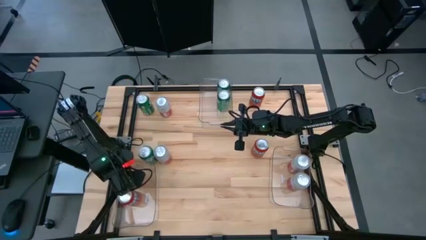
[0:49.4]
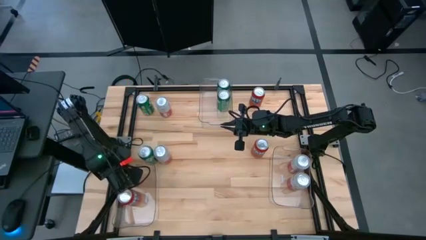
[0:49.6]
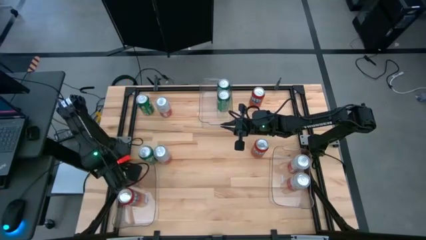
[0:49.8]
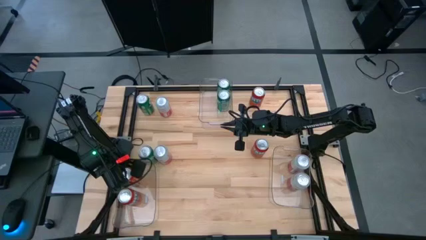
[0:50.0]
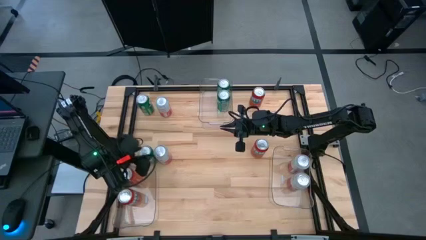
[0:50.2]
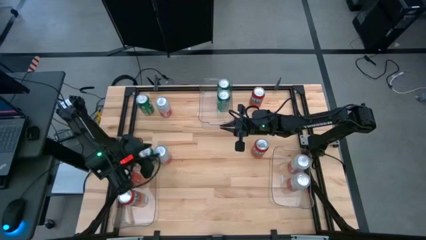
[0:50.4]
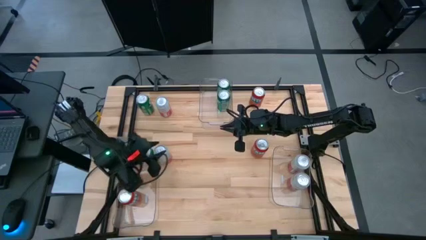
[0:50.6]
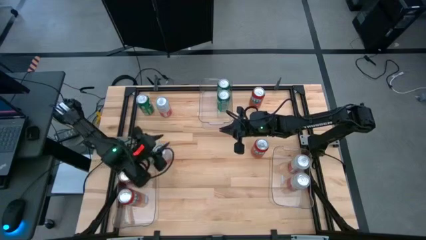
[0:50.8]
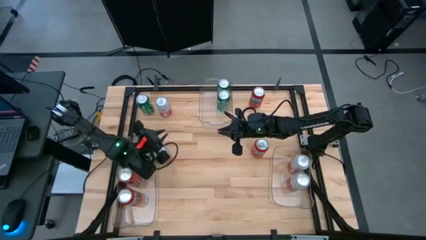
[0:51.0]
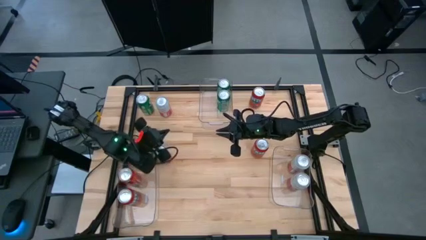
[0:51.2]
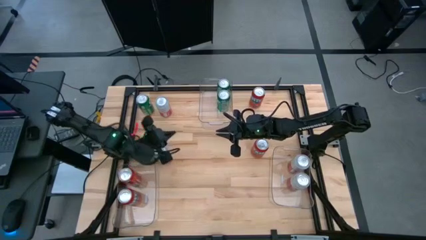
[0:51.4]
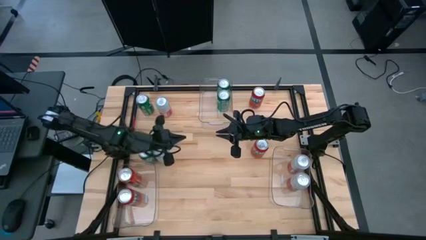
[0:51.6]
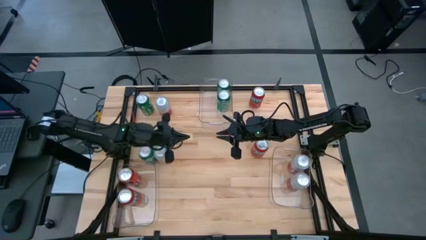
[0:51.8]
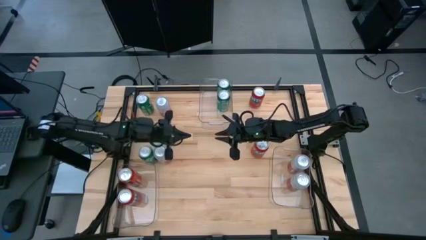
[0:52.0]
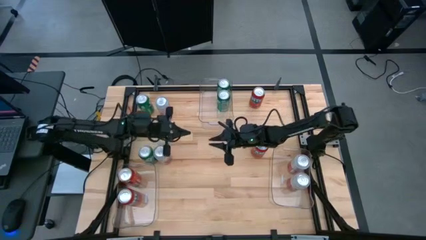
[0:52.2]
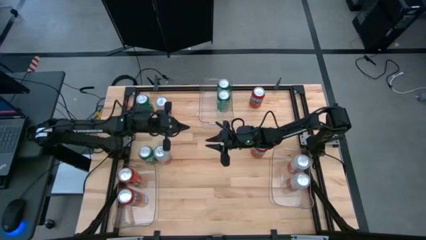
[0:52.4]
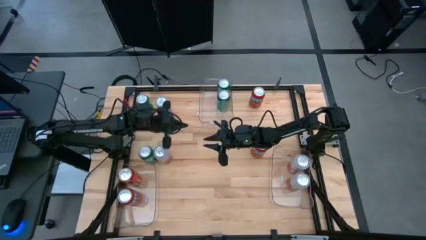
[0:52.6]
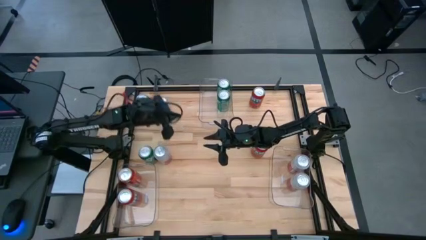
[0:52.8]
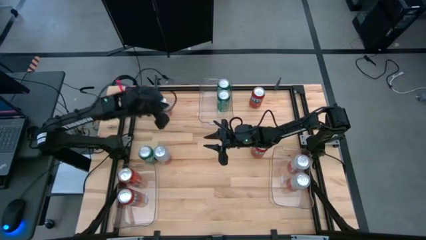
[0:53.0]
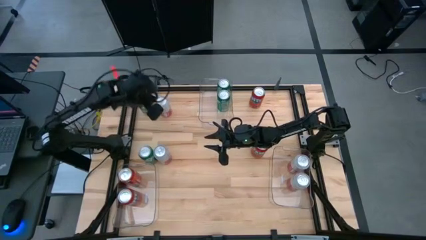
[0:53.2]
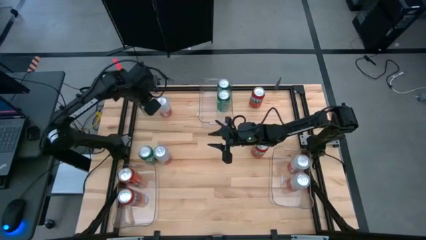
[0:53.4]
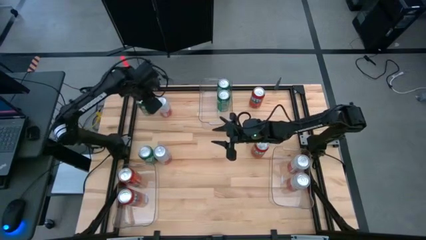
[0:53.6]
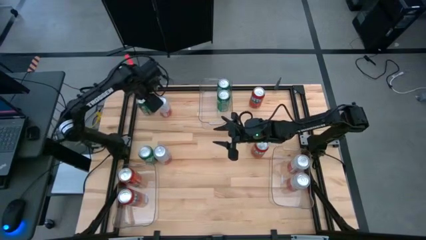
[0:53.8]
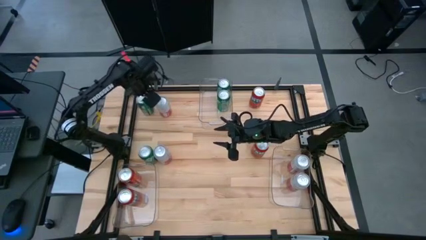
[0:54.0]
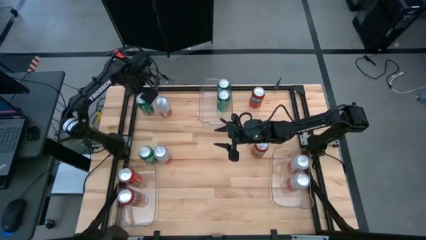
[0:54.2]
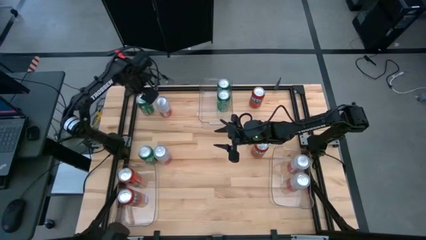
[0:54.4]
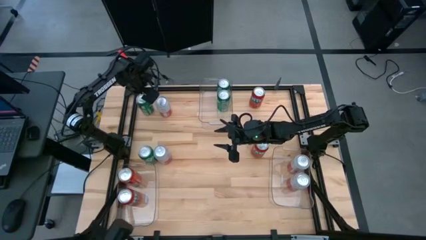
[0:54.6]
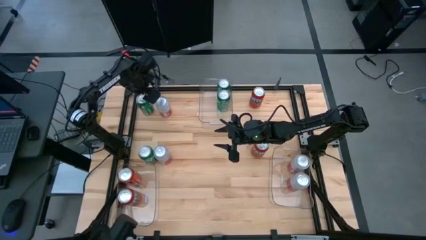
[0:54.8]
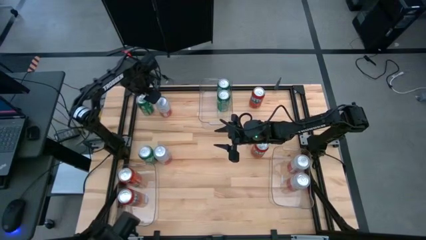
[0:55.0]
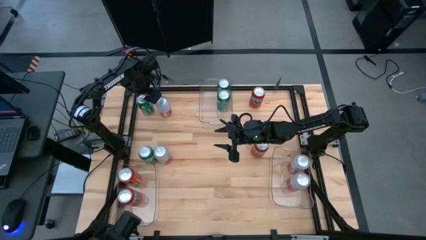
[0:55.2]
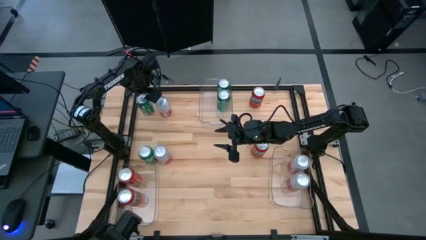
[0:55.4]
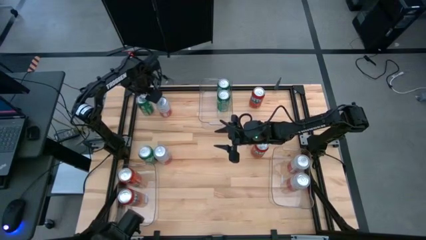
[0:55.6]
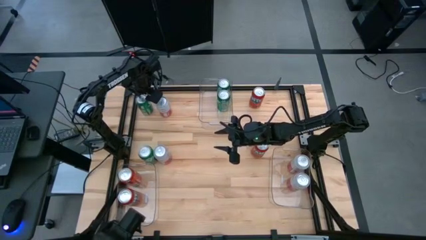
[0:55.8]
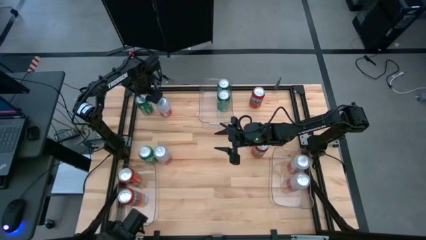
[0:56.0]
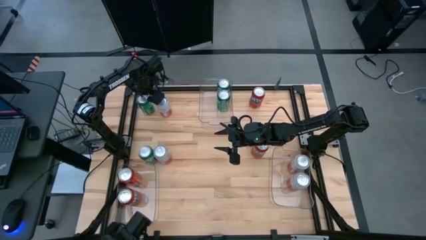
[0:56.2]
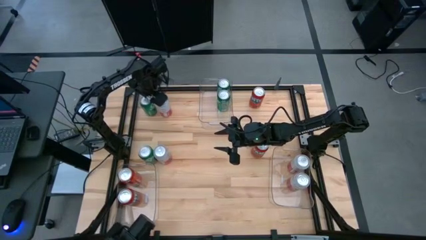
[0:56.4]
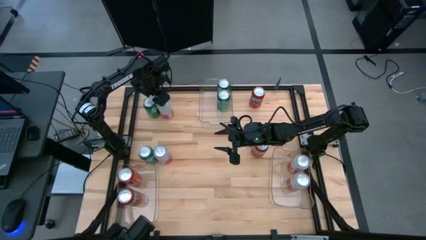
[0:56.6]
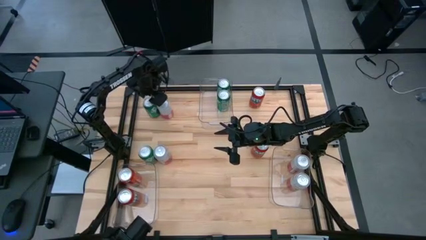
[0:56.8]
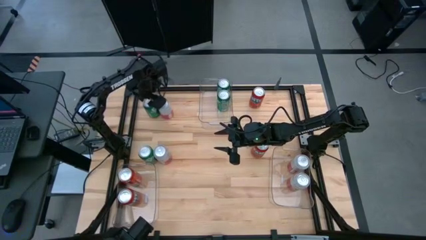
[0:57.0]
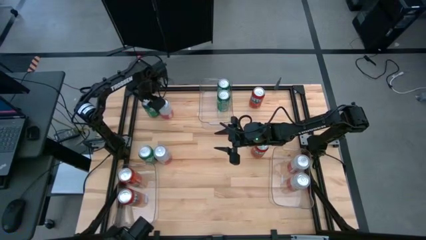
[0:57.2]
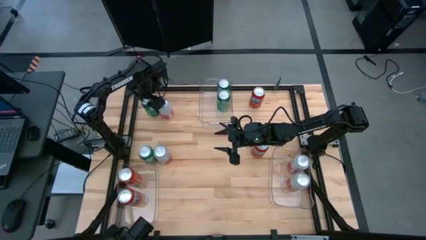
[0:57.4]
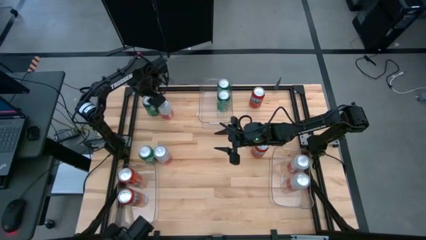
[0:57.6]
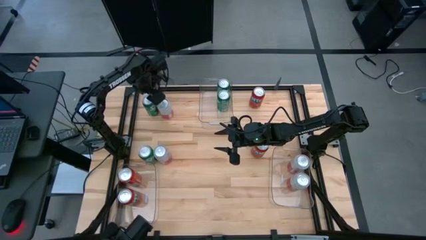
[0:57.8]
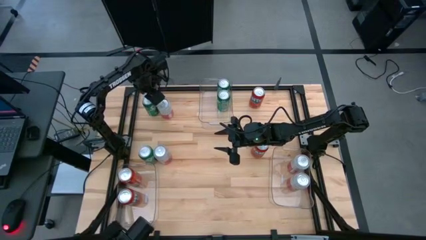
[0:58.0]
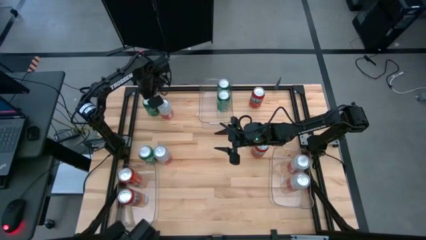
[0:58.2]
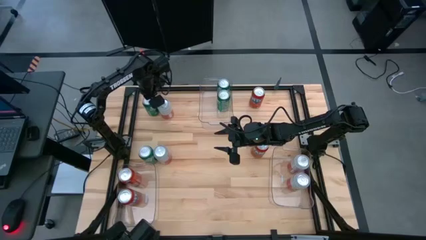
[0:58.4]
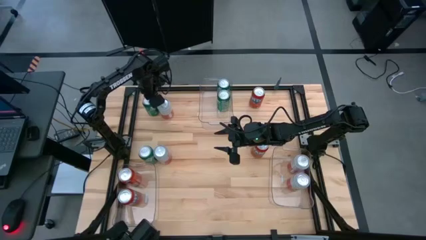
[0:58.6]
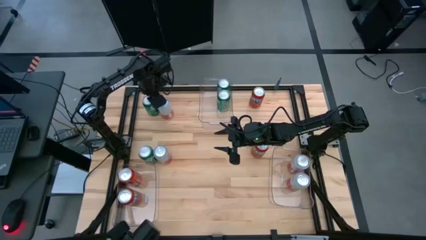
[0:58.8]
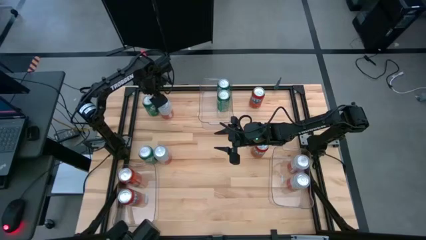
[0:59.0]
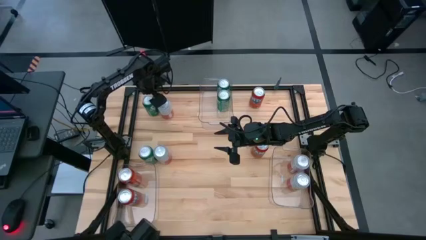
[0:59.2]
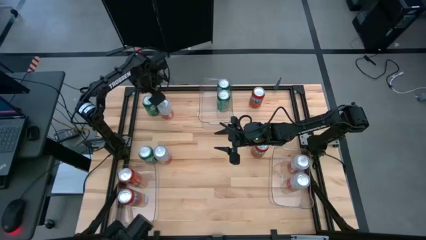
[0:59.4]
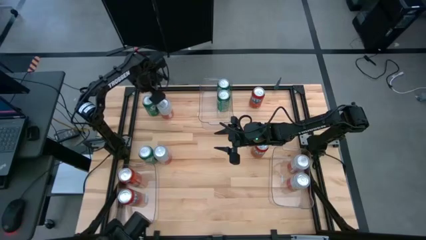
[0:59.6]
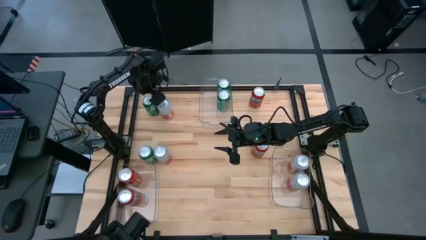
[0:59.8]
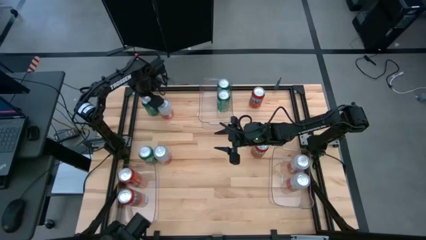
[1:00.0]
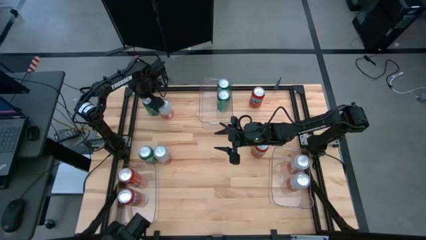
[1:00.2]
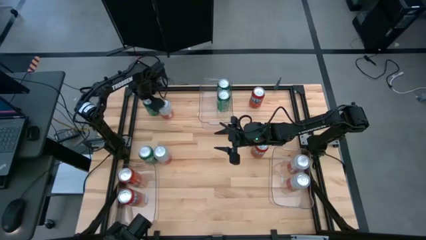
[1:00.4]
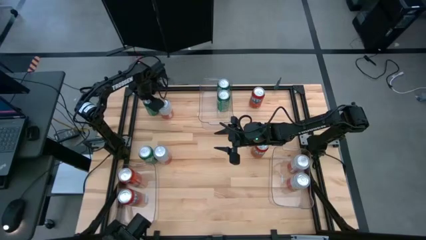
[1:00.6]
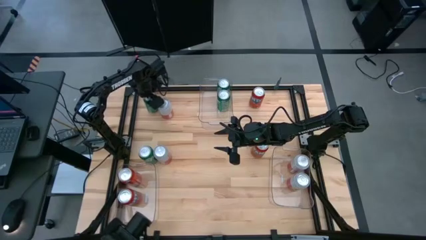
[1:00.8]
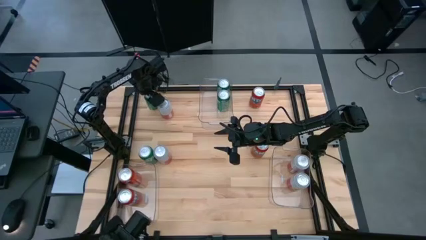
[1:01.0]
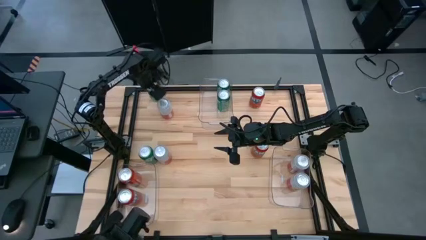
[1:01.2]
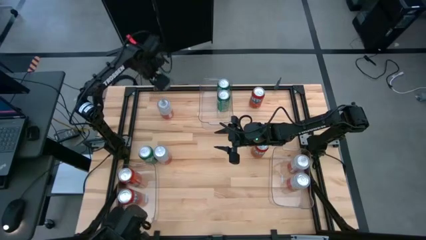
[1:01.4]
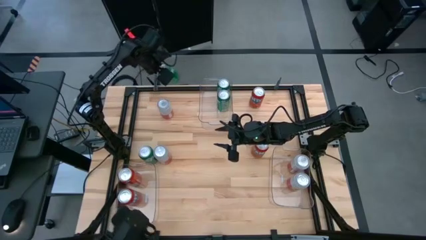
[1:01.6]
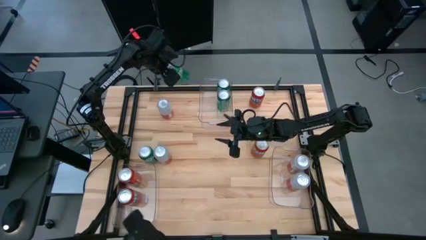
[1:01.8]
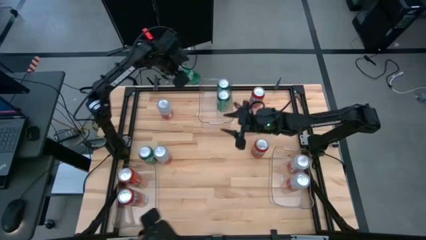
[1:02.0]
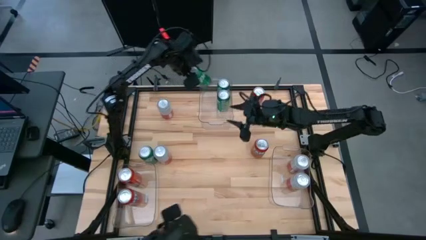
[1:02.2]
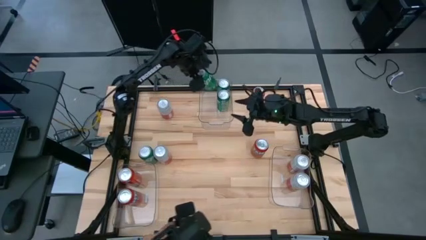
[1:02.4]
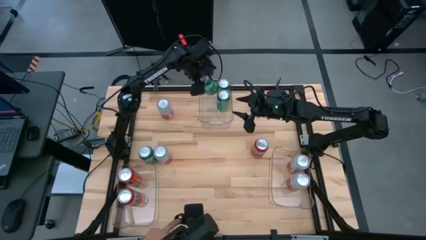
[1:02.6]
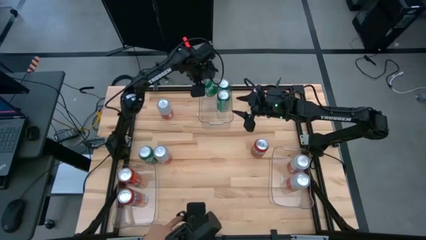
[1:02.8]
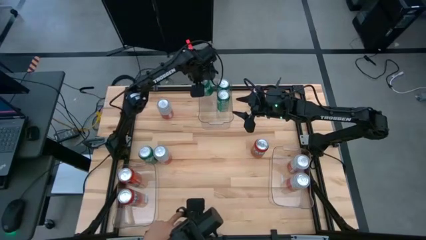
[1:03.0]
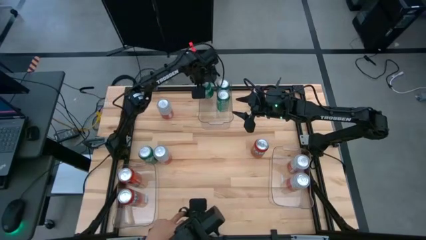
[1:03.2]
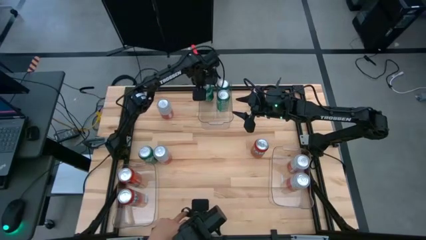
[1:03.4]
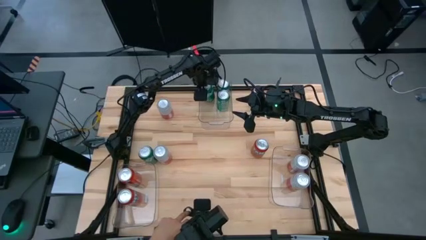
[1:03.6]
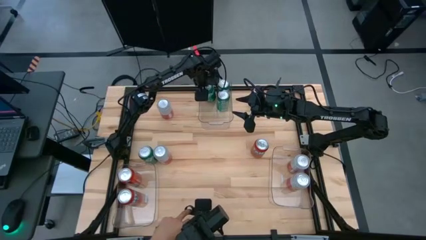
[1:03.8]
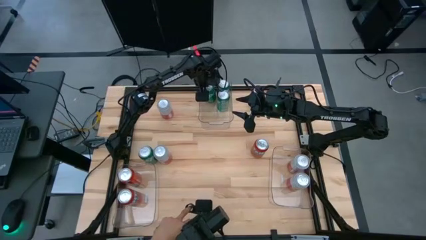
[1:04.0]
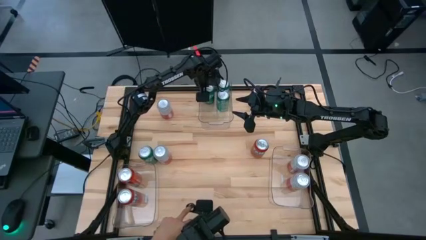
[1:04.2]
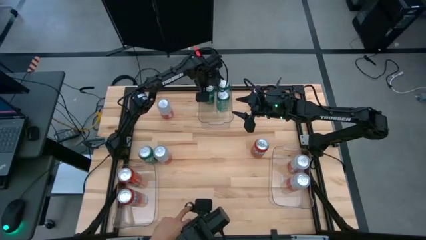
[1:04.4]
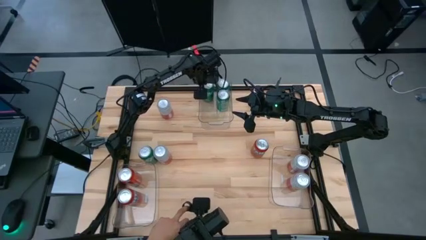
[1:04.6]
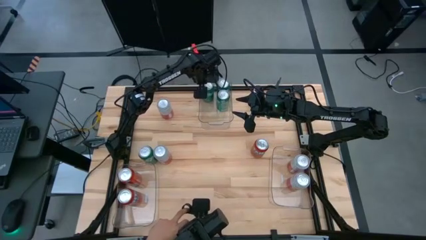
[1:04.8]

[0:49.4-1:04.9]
Task: Sort soda cans
Put the top green soda can into the top transparent bin

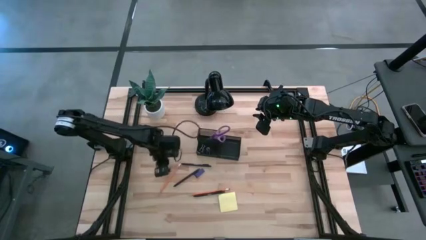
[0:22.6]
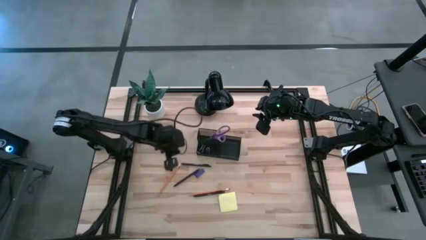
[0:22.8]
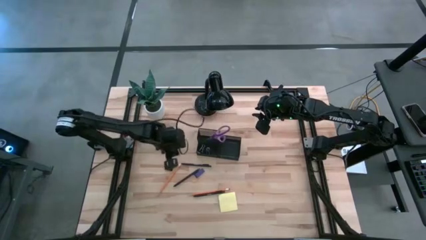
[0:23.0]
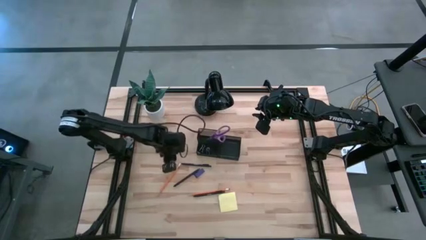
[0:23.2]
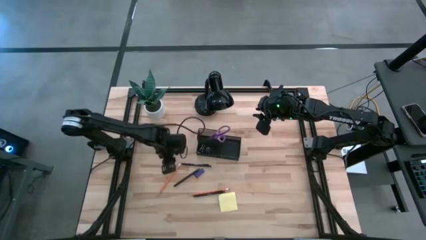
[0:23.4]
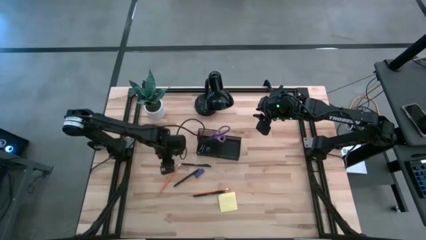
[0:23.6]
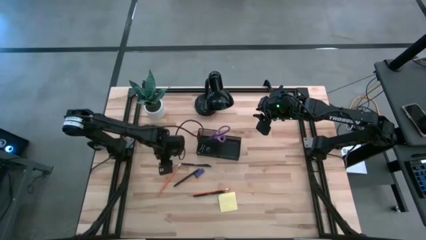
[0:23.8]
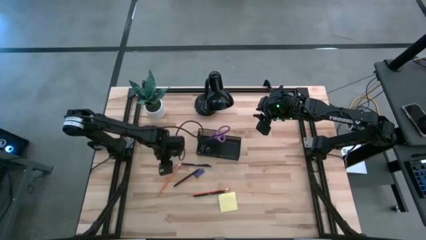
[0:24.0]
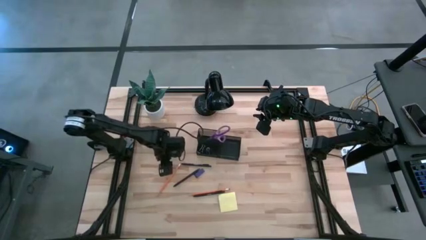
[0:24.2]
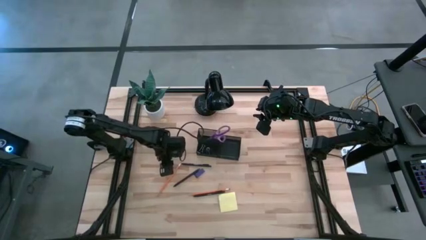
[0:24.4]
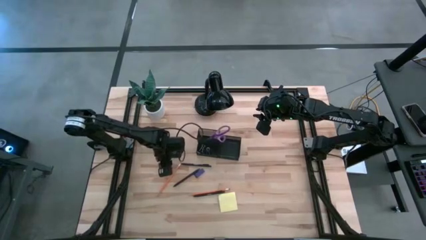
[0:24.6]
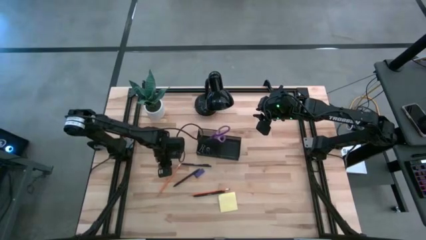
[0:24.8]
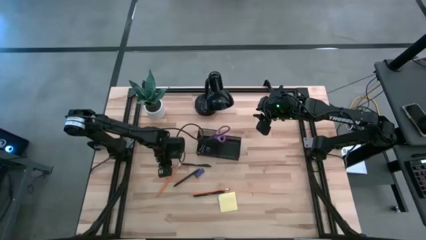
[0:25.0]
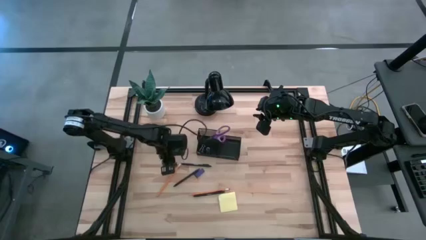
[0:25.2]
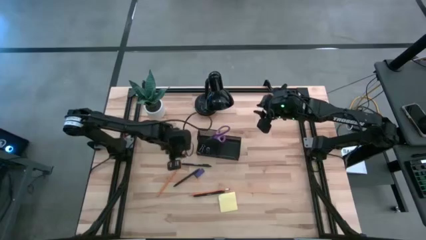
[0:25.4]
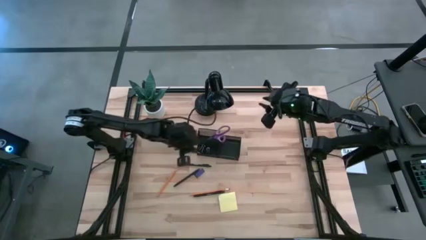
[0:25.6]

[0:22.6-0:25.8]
Task: Pick and place office supplies into organizer
Put the black binder clip into the black desk organizer
